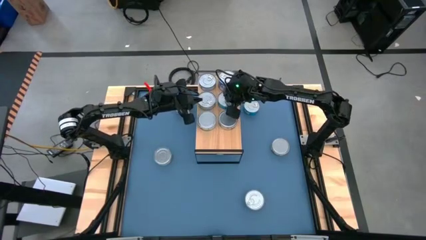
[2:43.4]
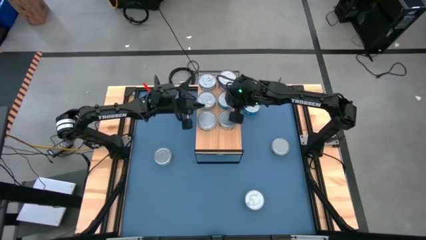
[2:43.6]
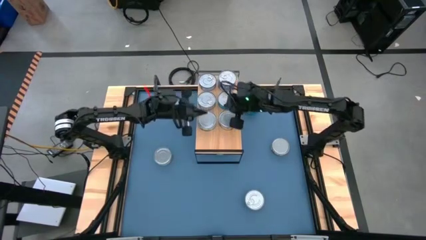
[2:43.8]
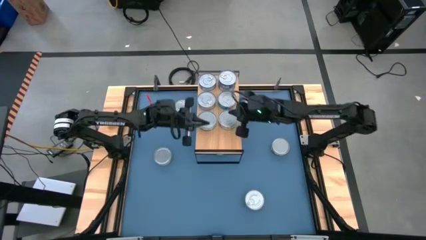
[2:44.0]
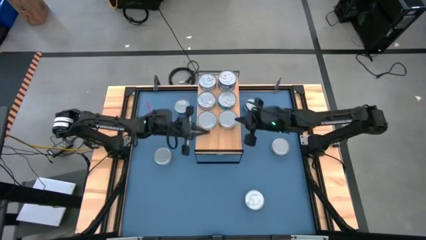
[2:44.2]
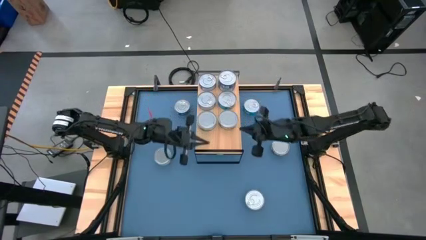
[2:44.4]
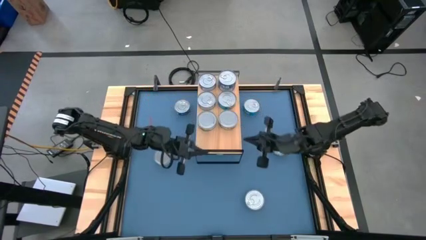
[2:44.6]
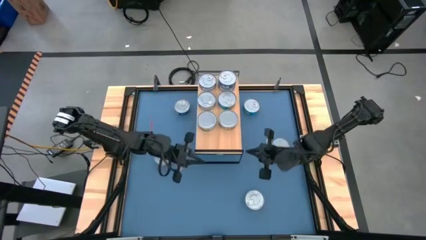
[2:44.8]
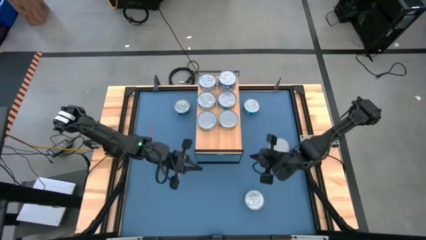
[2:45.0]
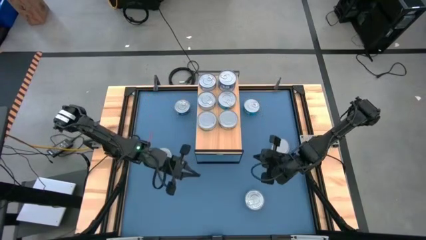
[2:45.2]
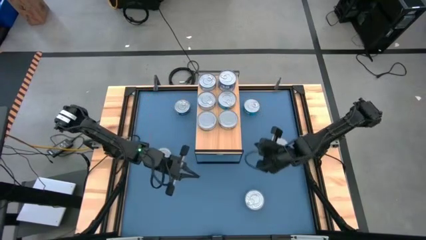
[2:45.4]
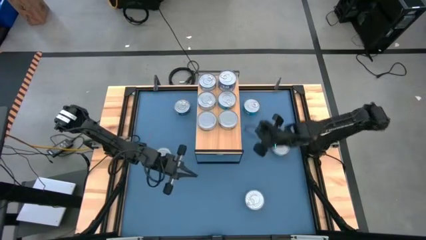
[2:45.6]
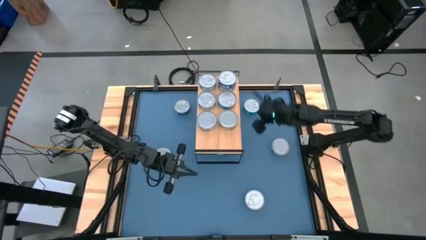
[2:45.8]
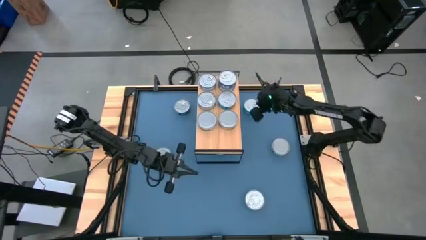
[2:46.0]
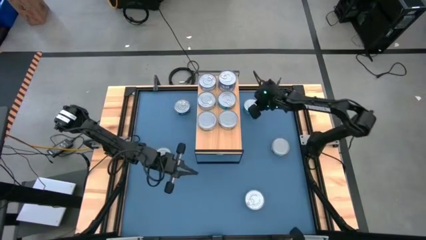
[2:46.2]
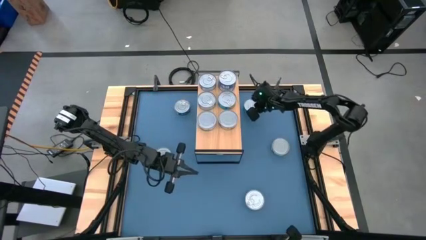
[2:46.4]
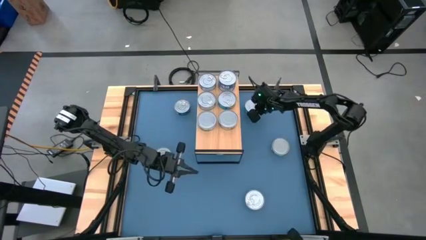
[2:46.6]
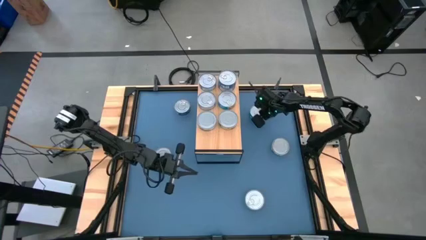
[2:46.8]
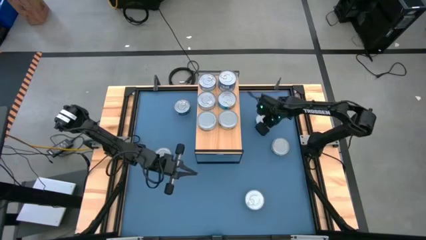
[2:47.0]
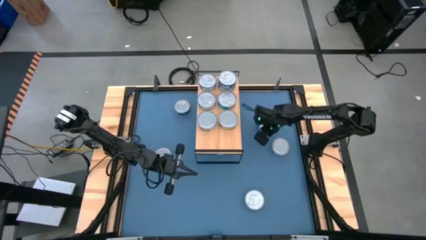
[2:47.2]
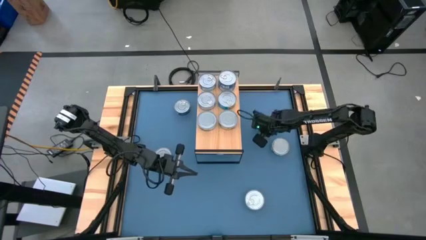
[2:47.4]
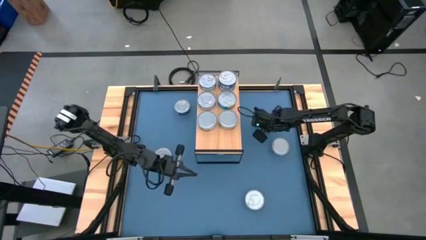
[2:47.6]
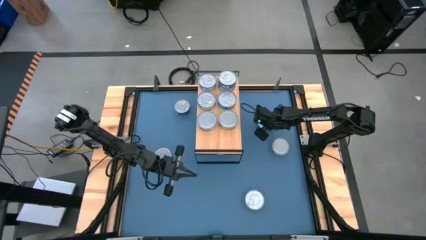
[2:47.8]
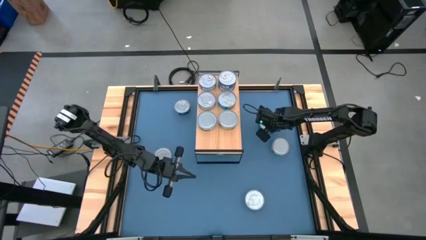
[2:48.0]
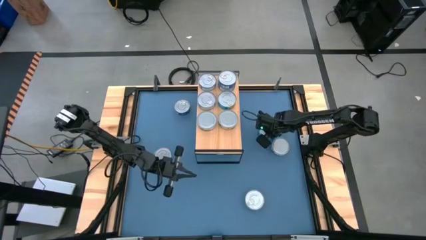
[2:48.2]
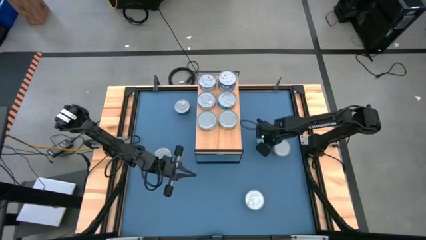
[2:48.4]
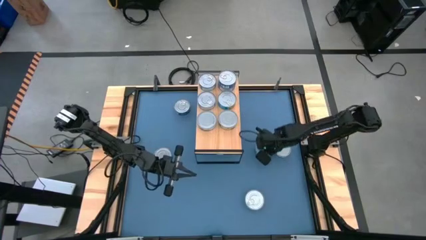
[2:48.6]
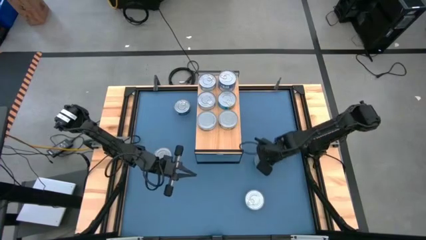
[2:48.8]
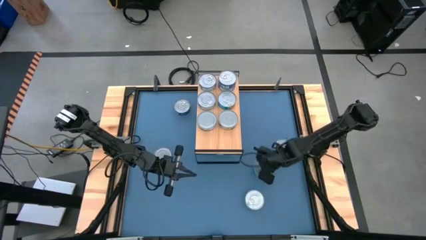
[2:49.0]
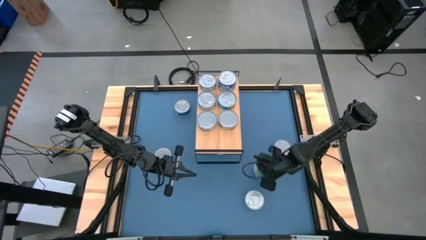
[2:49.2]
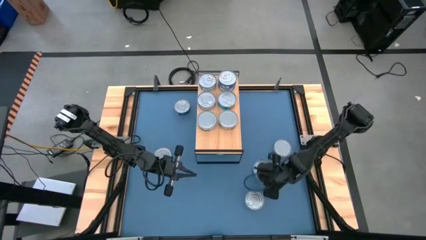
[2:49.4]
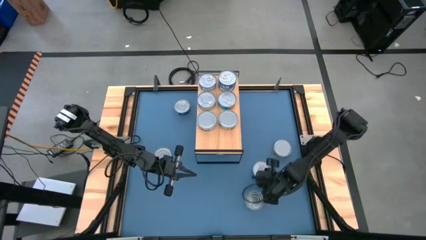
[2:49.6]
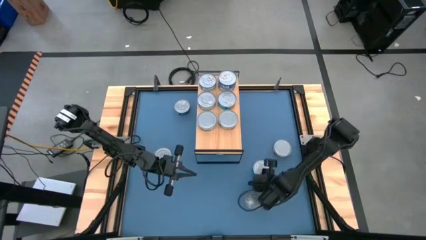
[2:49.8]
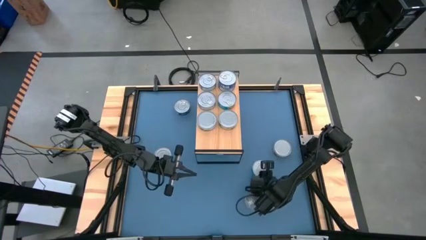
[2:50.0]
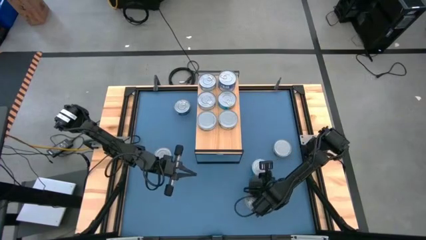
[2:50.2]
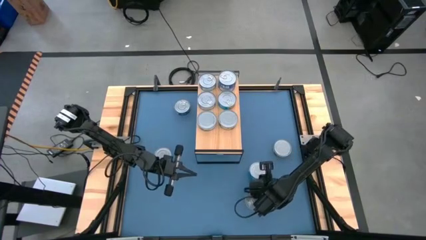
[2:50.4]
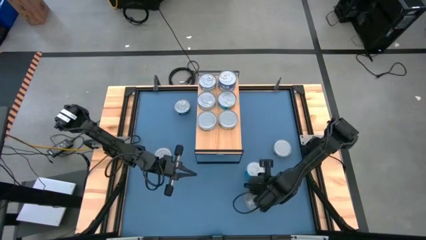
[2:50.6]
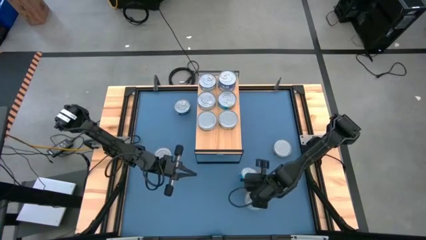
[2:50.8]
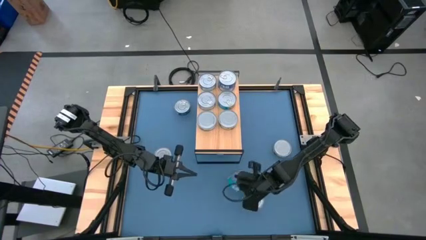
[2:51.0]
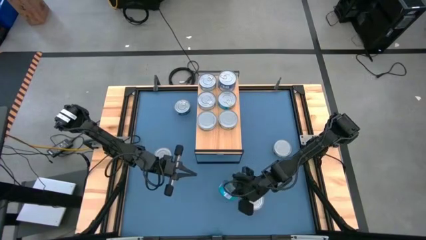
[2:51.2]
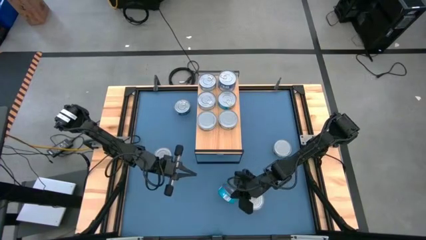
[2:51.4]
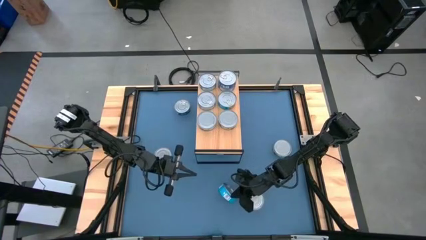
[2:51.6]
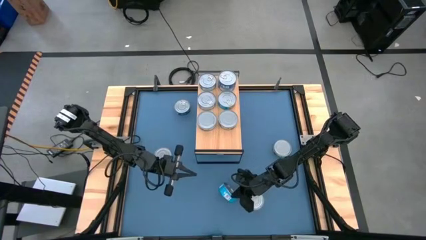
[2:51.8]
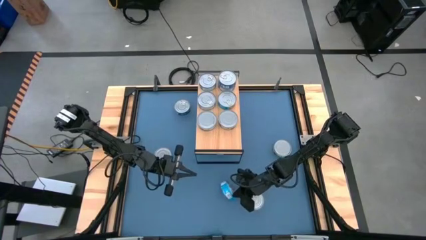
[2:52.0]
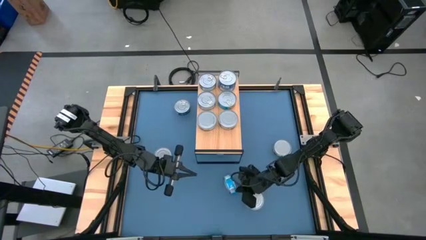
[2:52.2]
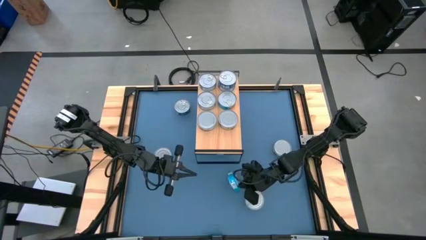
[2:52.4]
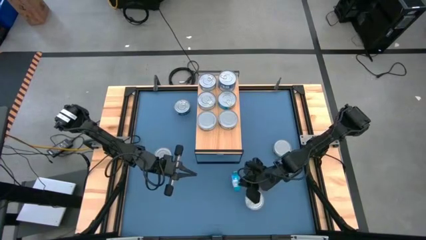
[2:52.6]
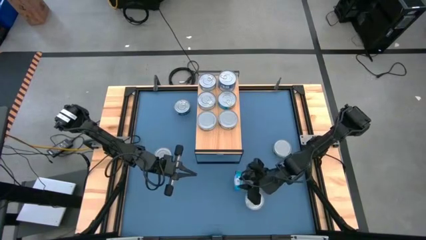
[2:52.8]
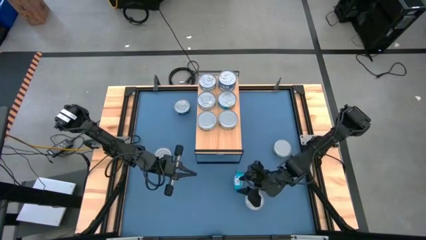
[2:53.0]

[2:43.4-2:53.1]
Task: Stack canned seafood by type on shelf
Stack the yellow-blue tuna can on top of the other yellow-blue tuna can on the shelf

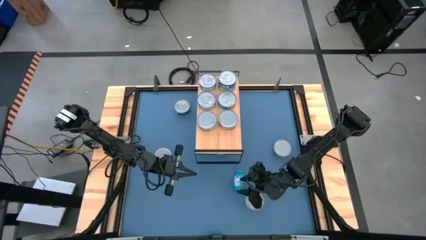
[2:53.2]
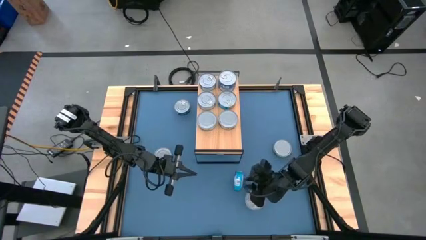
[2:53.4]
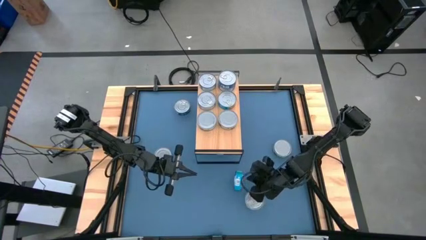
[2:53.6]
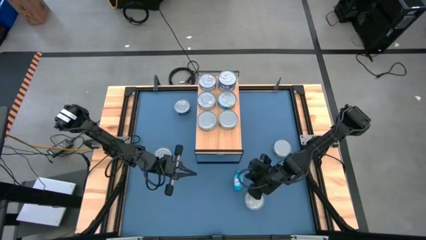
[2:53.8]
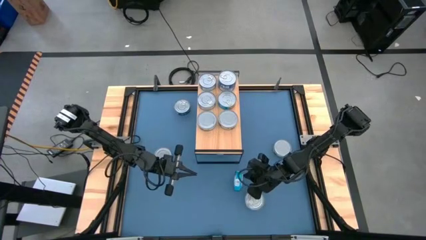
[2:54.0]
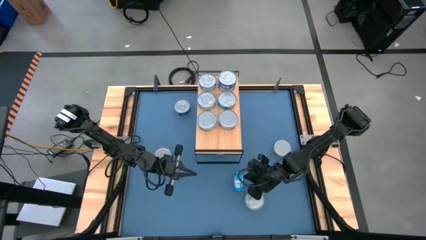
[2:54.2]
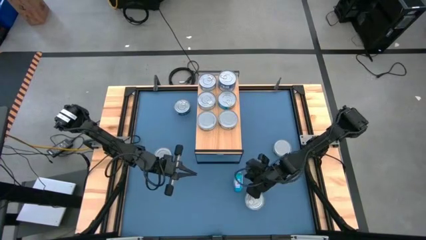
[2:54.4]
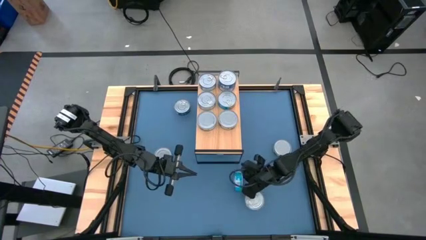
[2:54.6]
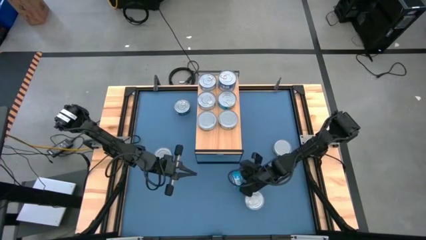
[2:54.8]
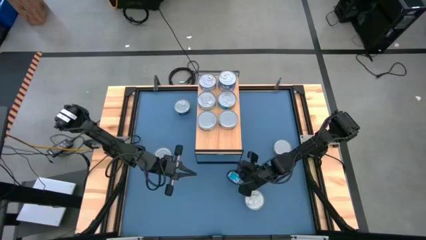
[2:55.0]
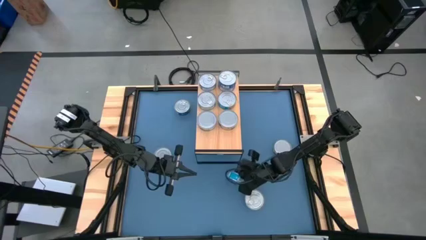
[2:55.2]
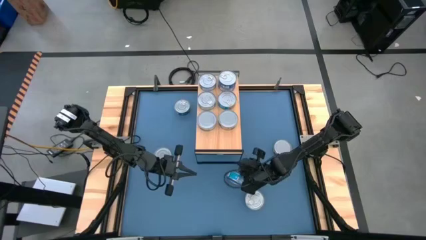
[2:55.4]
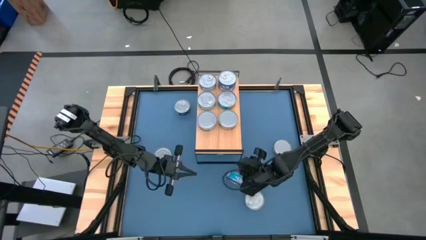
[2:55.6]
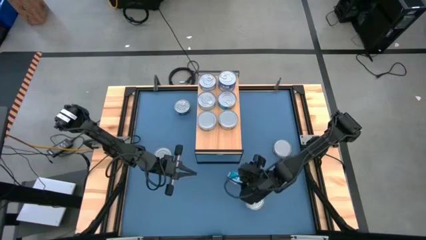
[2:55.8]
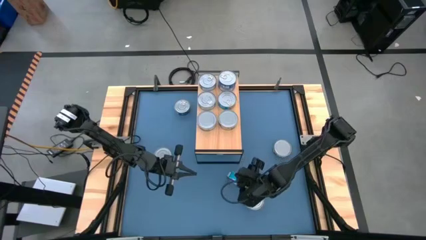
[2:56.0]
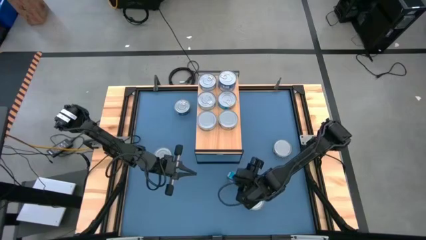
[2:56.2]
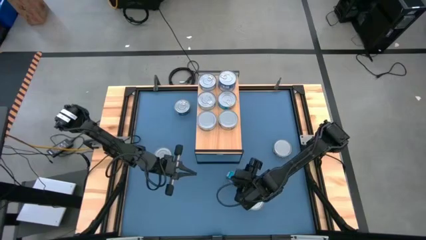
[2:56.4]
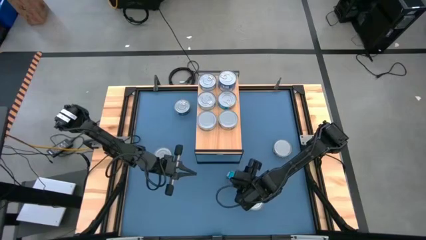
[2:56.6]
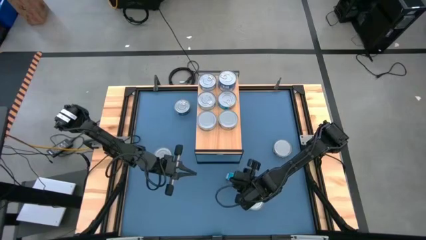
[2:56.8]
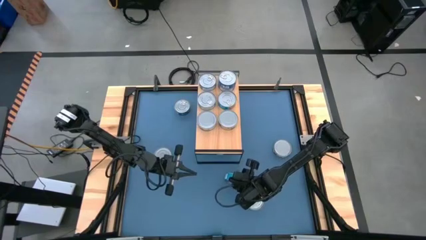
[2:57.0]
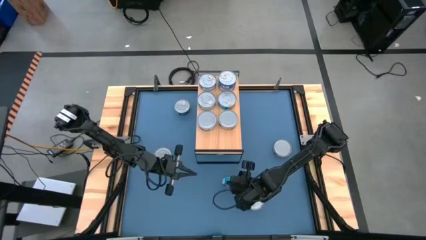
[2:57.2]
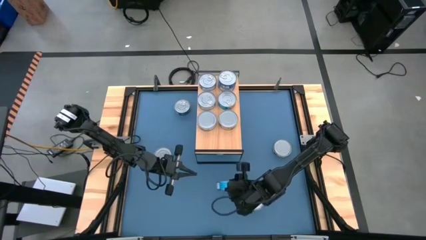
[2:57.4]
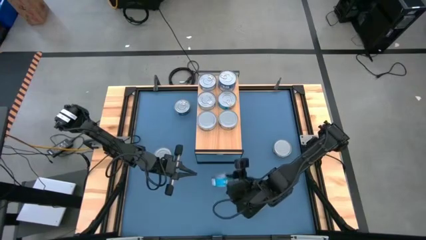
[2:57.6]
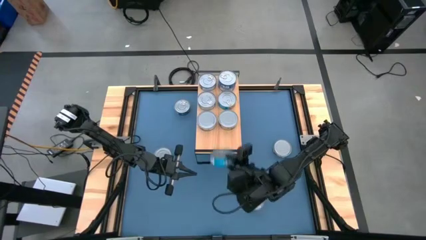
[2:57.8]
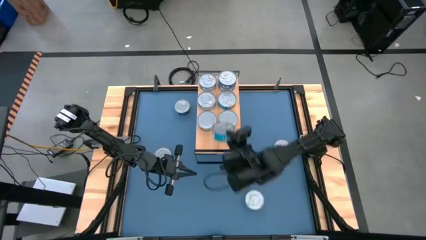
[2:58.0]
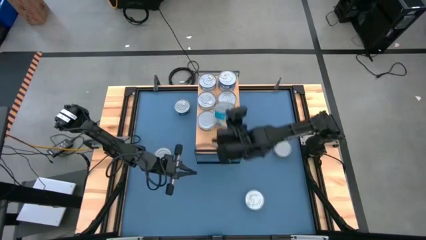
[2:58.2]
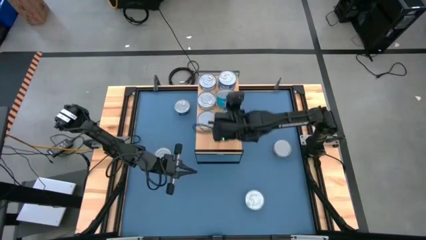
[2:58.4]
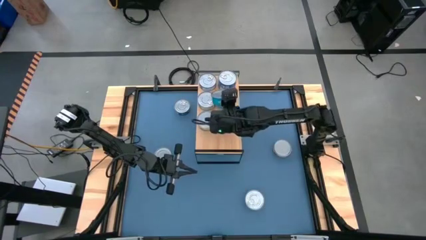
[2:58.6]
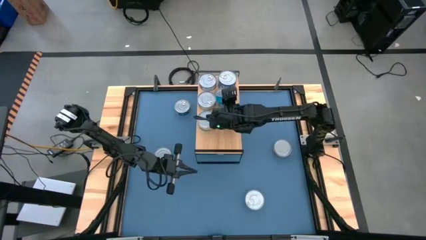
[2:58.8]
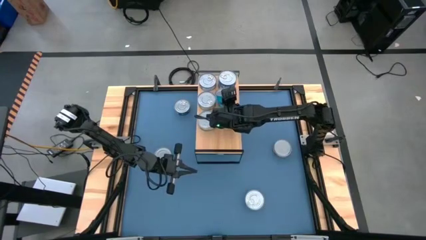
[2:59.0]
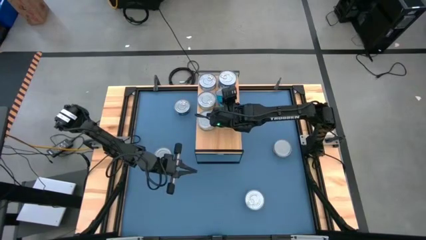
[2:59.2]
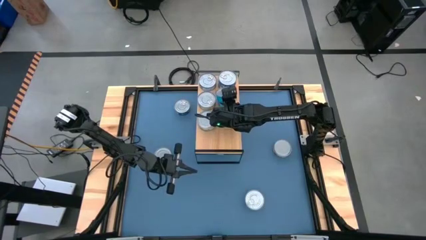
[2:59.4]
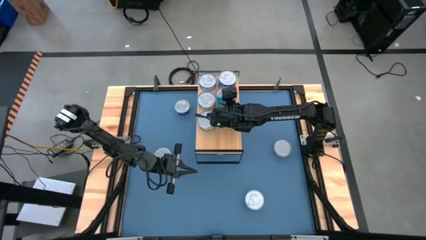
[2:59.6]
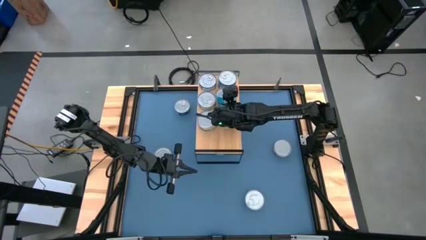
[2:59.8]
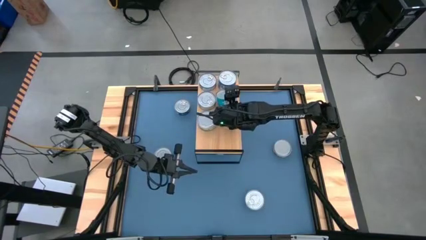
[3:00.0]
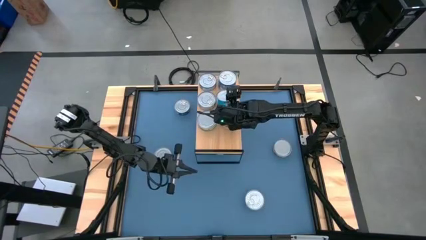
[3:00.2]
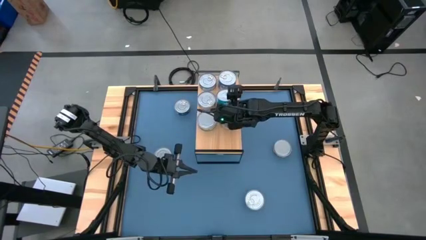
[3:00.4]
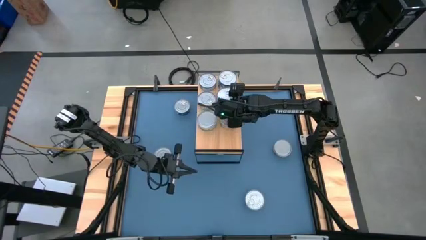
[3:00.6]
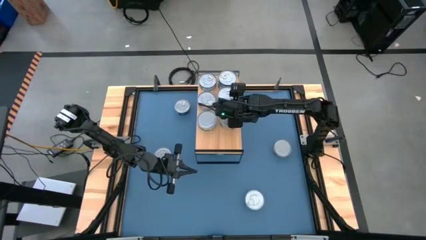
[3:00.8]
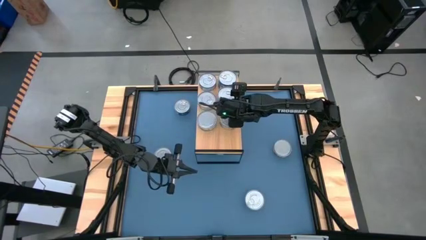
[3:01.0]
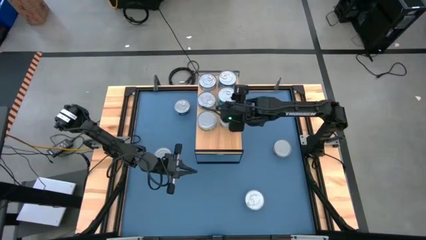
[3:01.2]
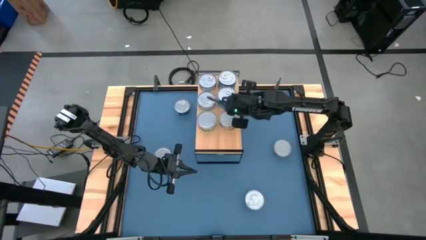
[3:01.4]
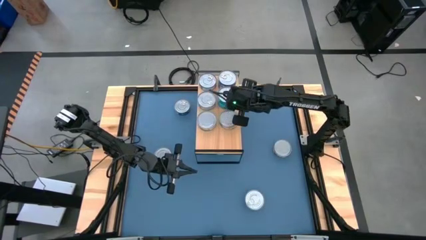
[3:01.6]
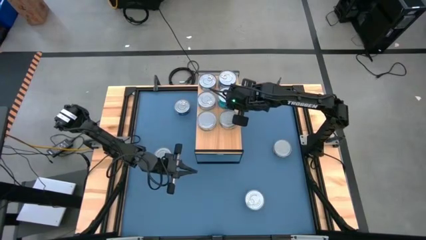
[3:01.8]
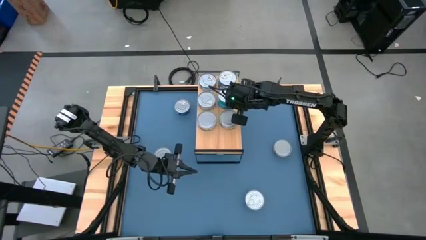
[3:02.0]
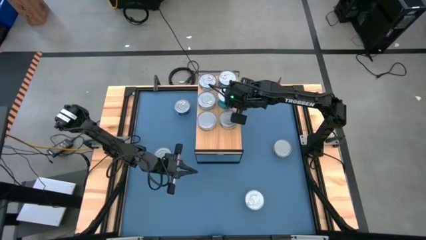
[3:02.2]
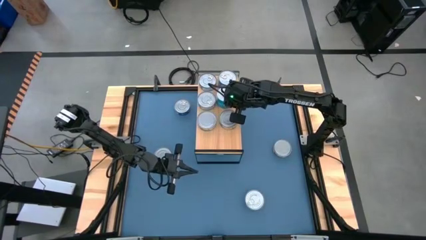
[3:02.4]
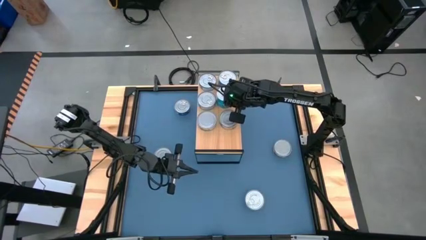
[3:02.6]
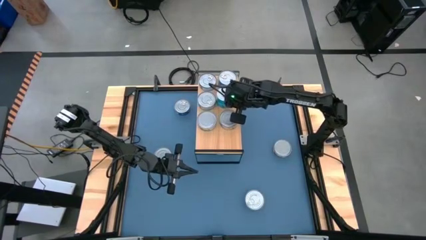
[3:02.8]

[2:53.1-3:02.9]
Stack the yellow-blue tuna can on top of the other yellow-blue tuna can on the shelf
